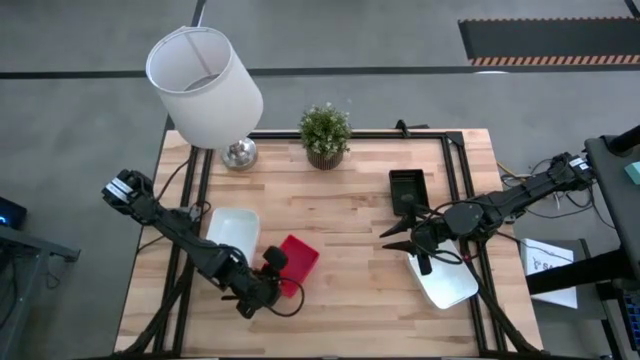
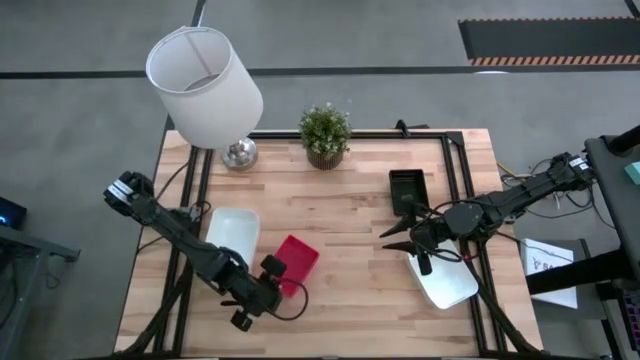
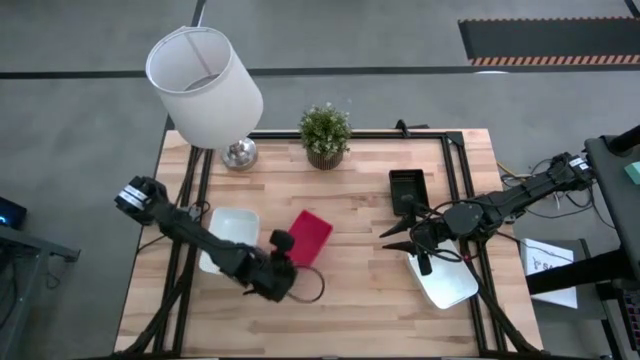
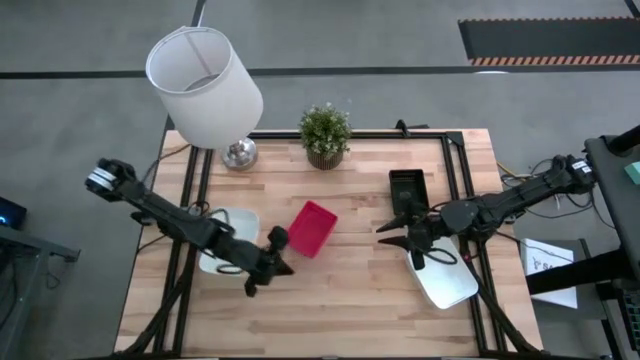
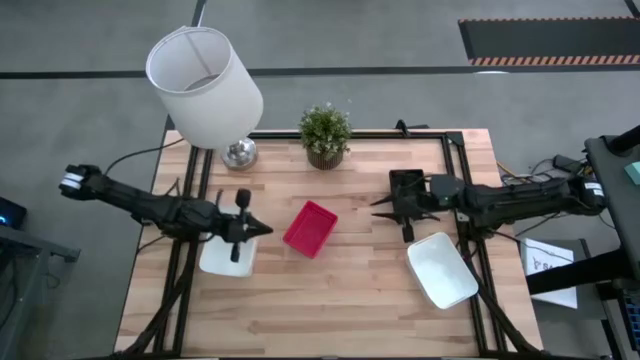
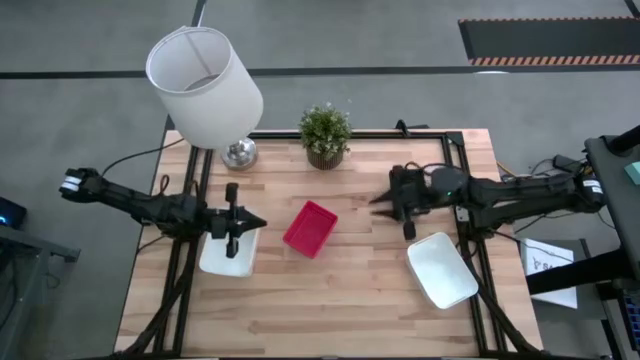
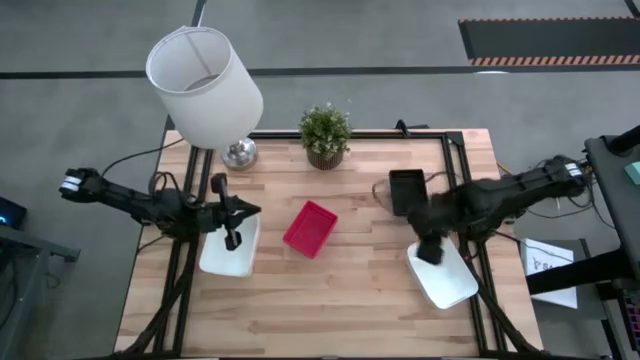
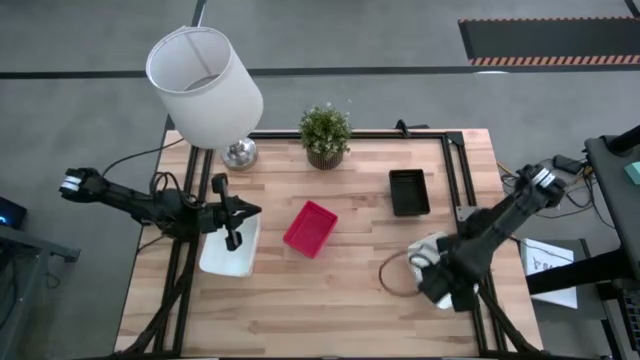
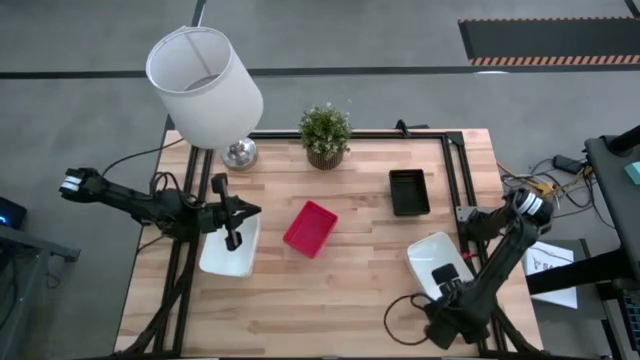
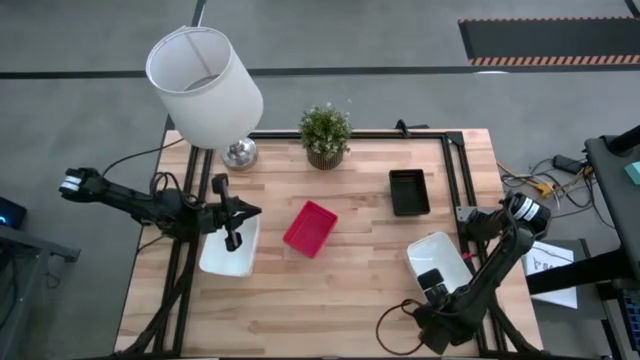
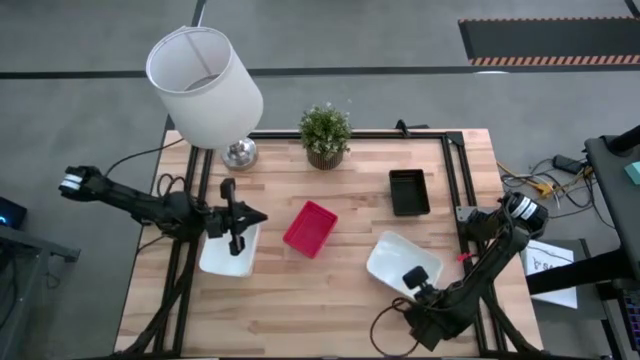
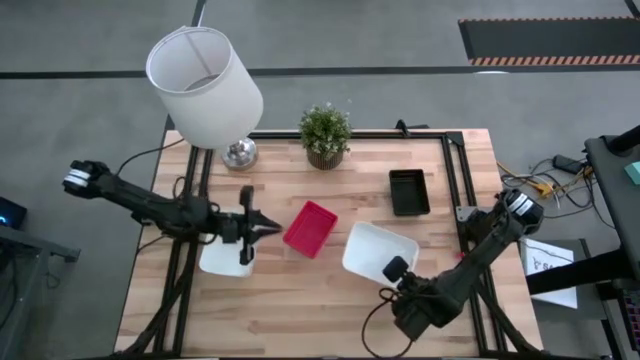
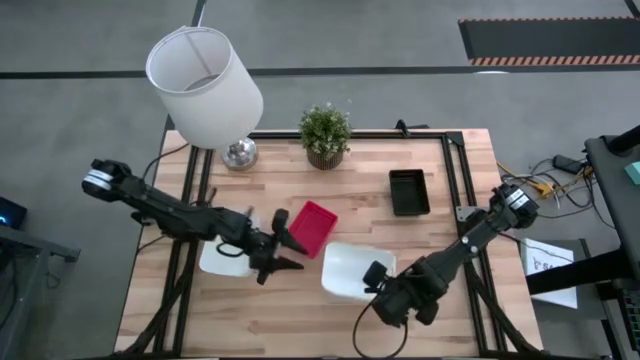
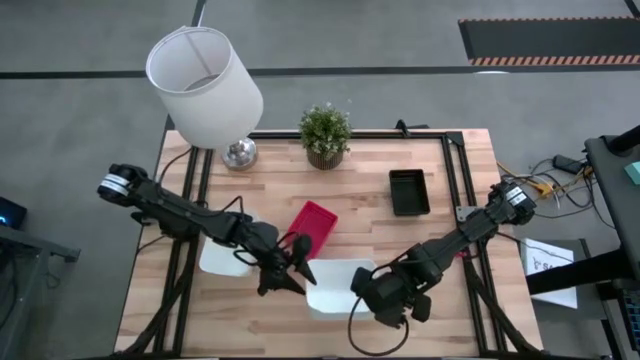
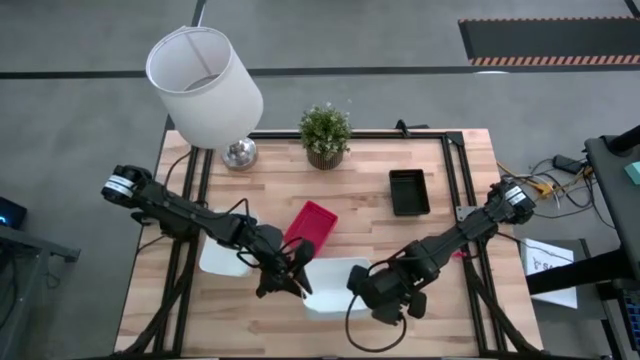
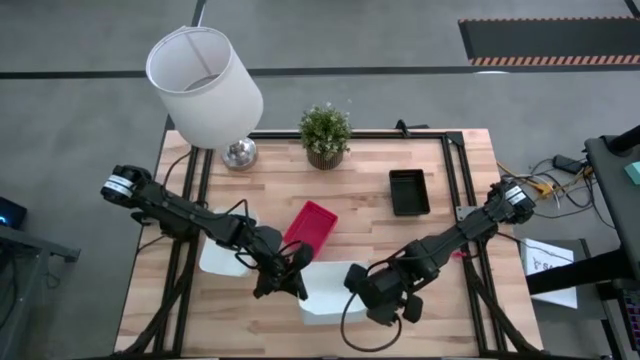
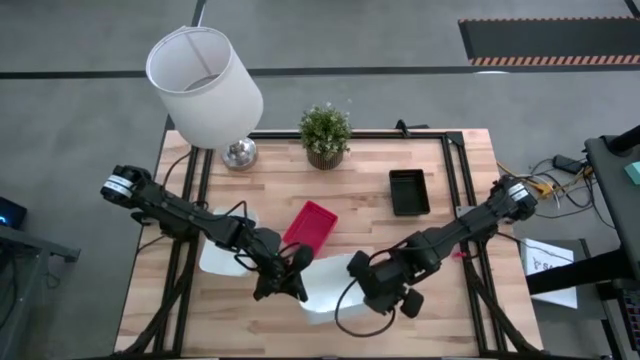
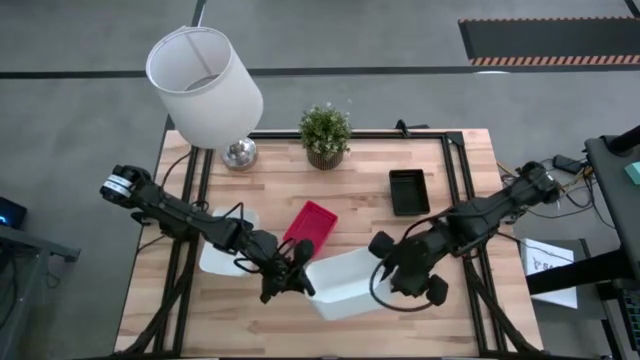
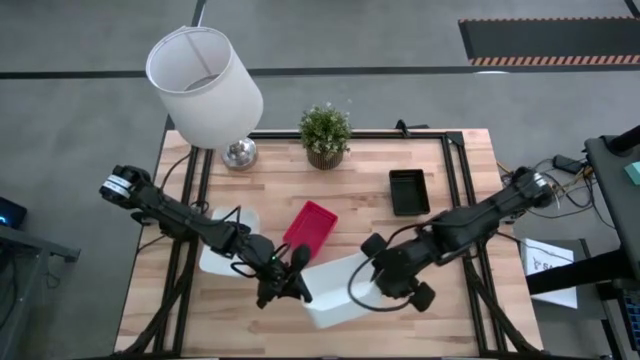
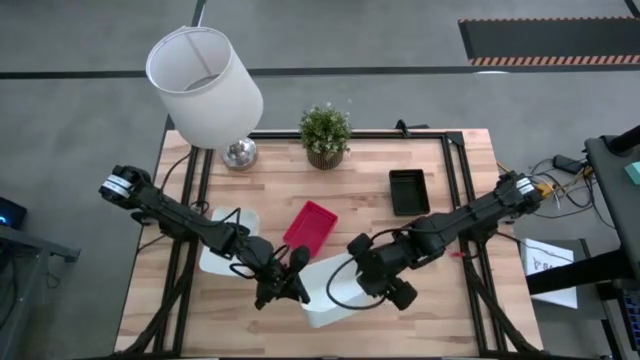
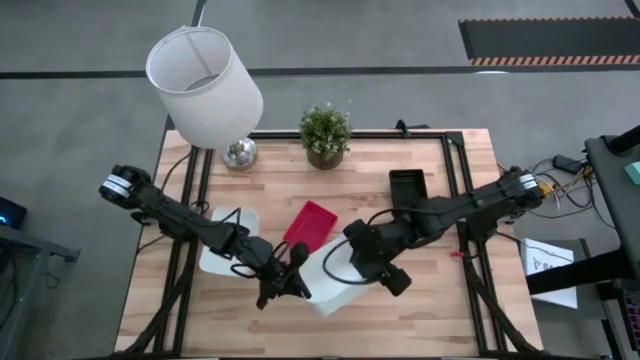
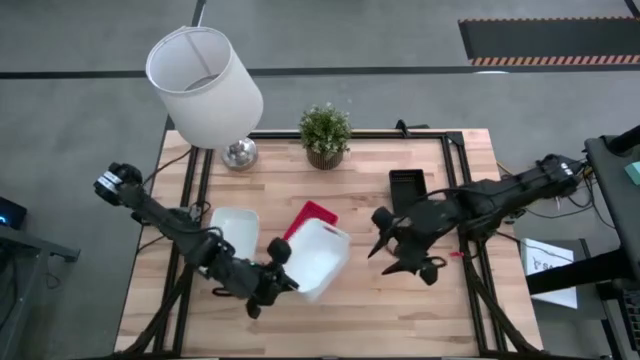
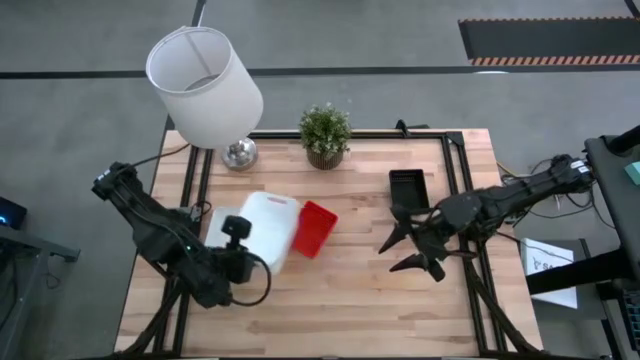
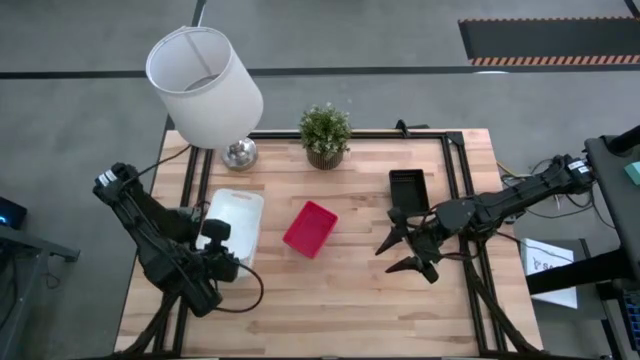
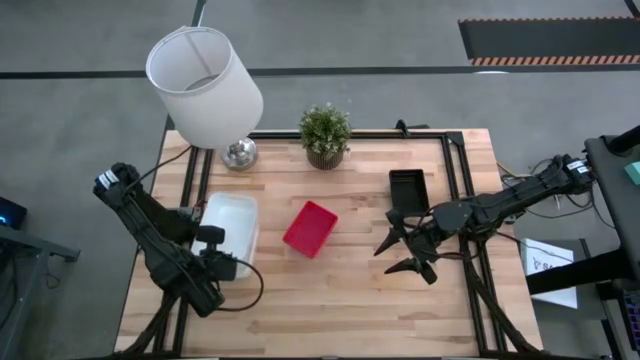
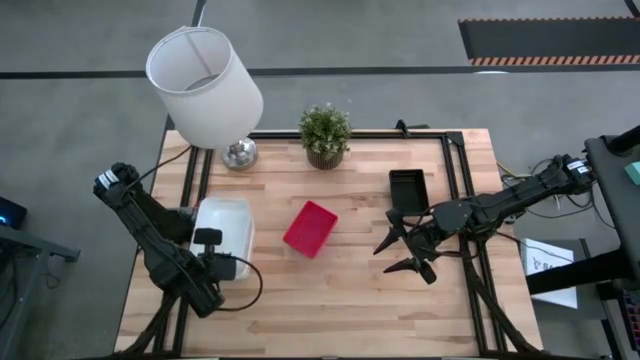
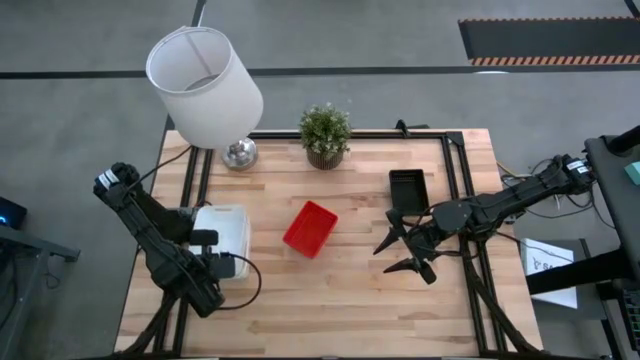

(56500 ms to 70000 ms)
Stack the white bin on the stacked white bins

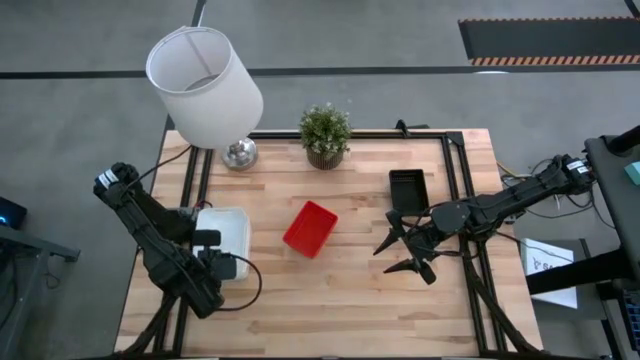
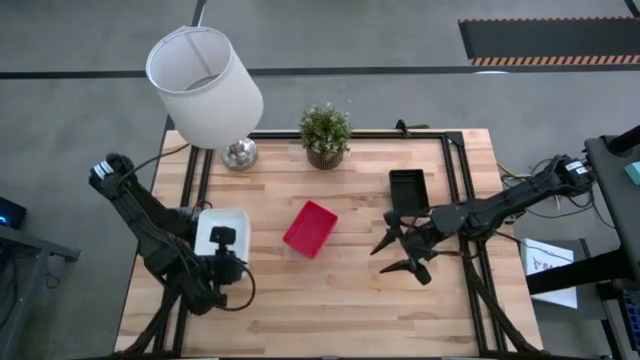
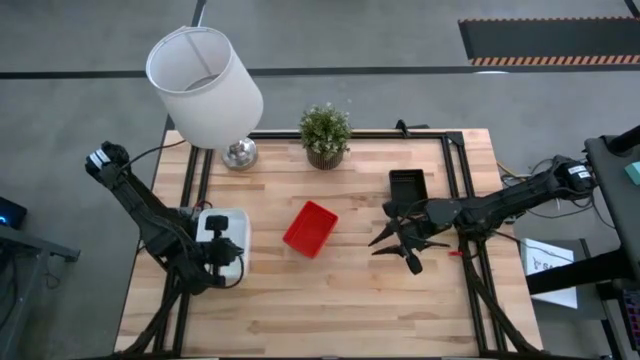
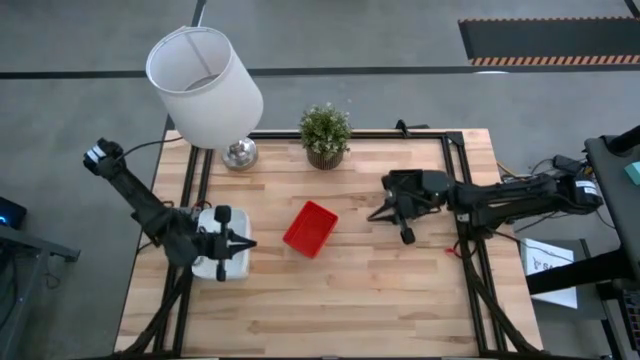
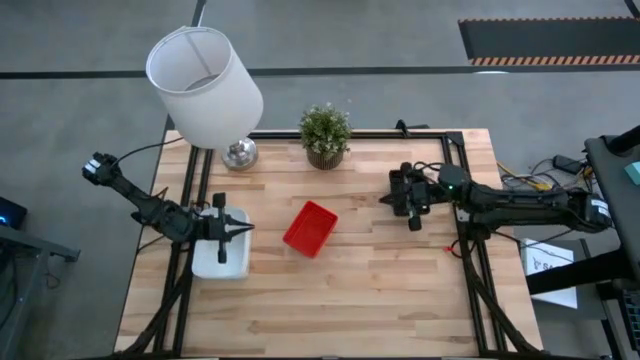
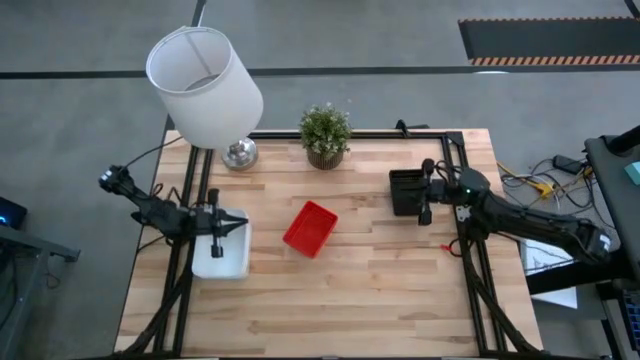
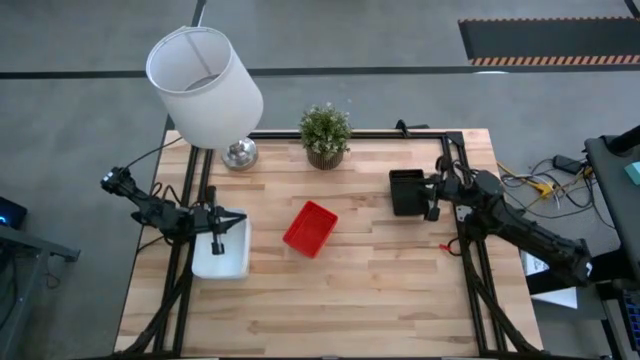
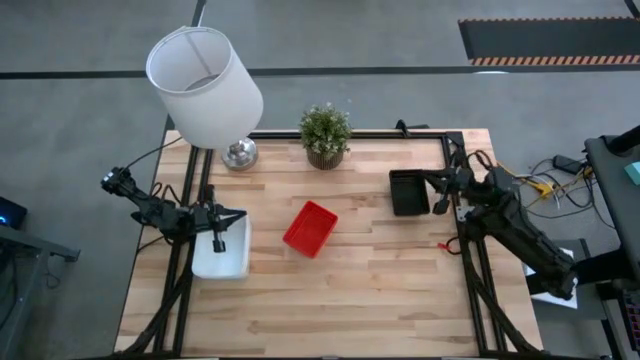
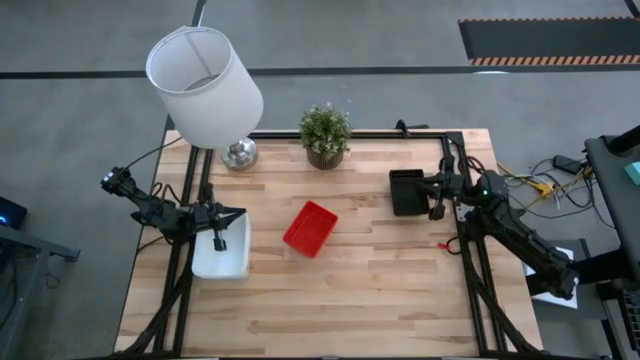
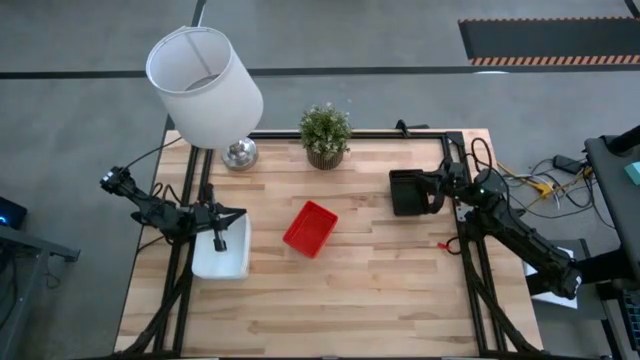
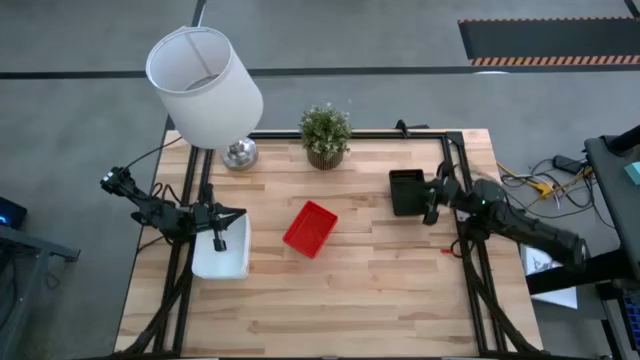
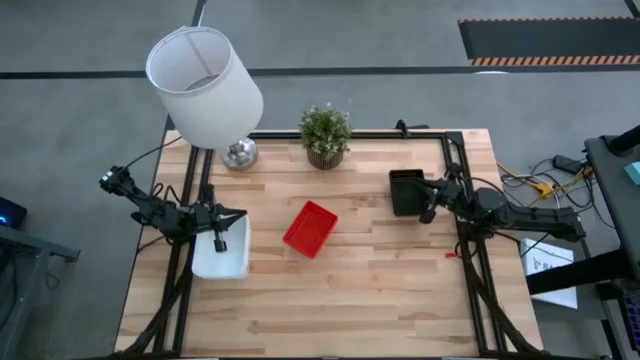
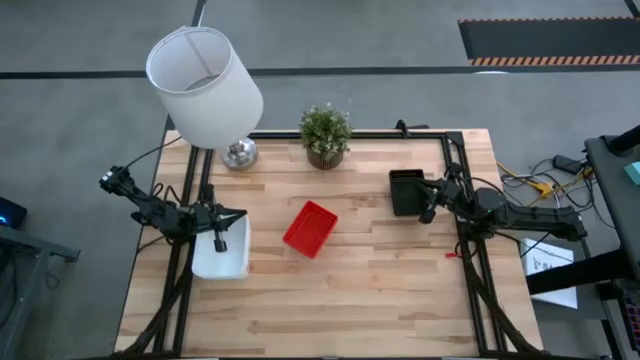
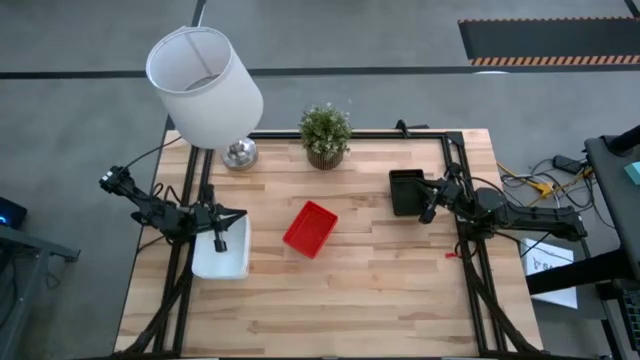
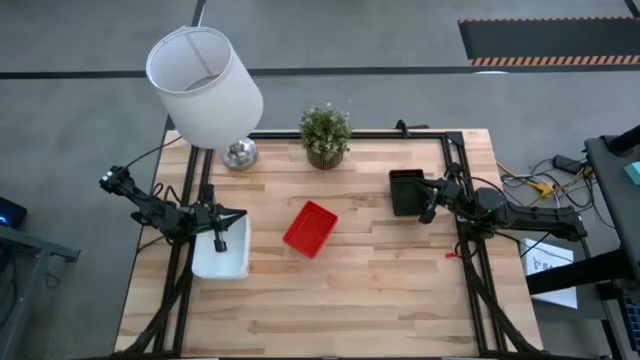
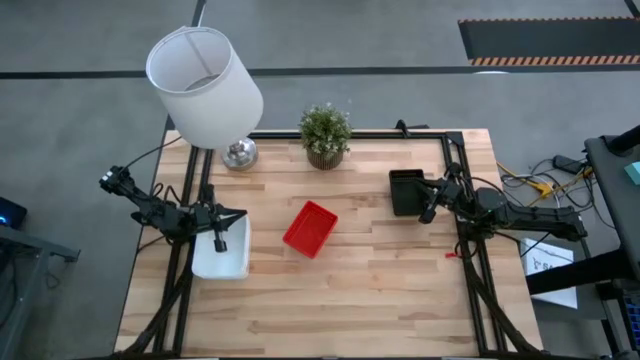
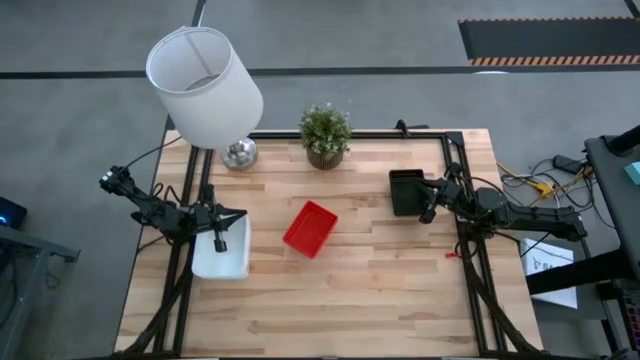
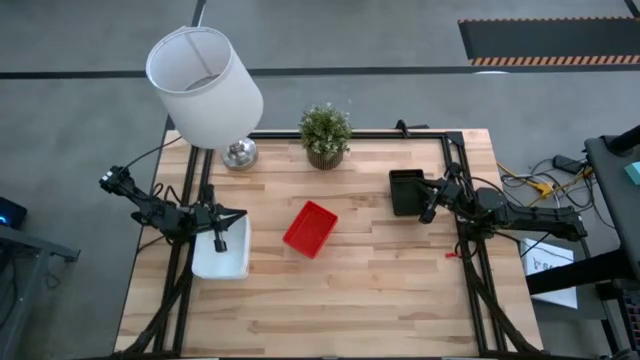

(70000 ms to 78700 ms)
Return to Home Position
